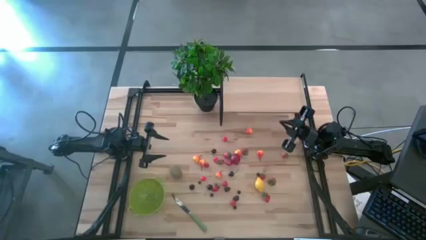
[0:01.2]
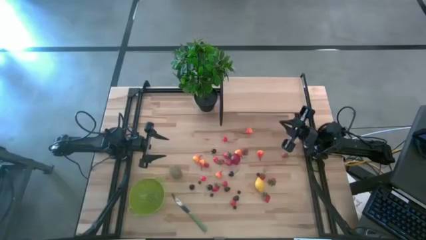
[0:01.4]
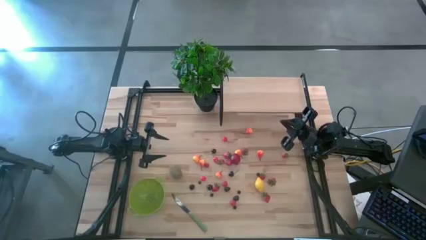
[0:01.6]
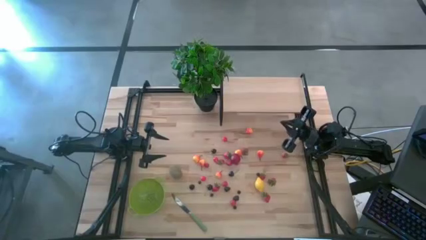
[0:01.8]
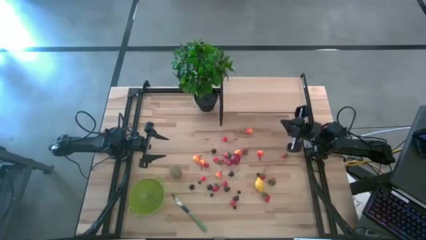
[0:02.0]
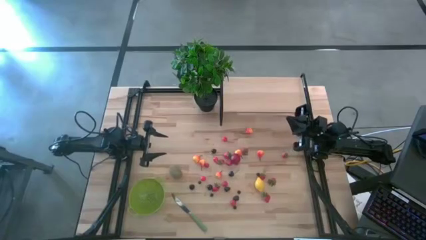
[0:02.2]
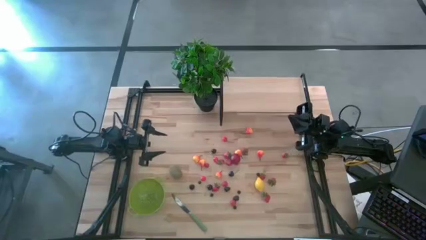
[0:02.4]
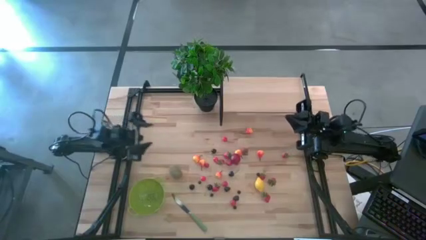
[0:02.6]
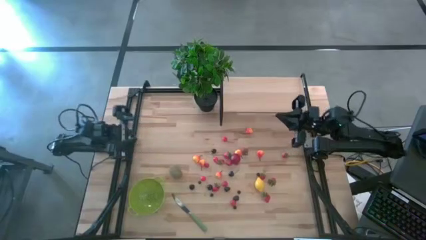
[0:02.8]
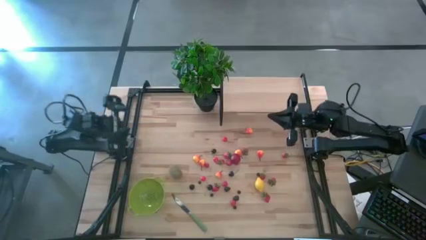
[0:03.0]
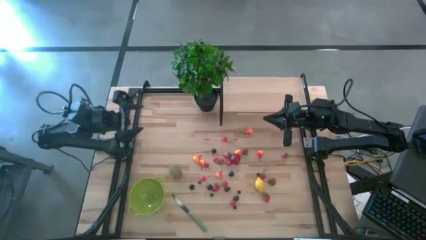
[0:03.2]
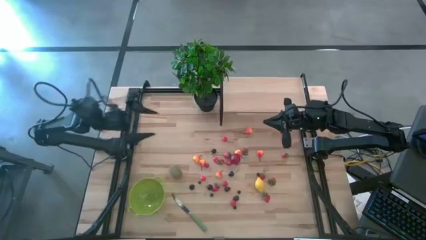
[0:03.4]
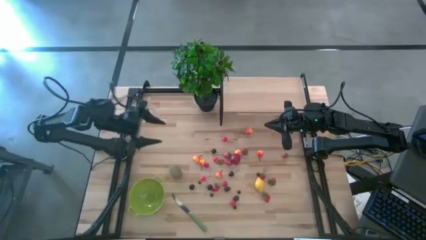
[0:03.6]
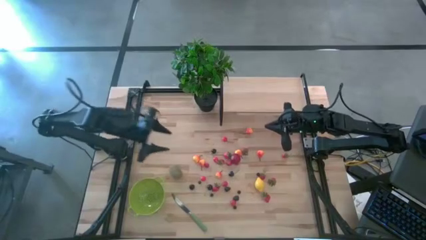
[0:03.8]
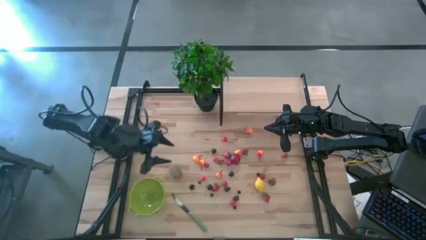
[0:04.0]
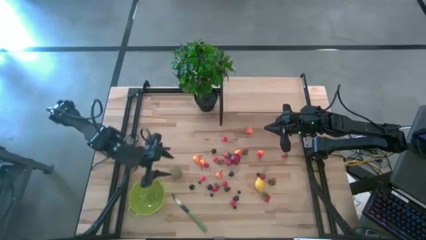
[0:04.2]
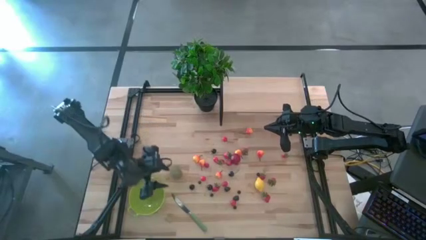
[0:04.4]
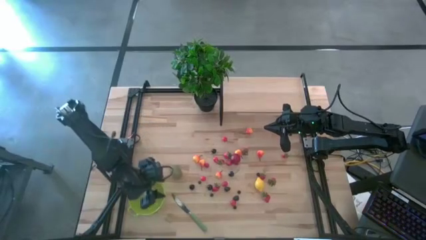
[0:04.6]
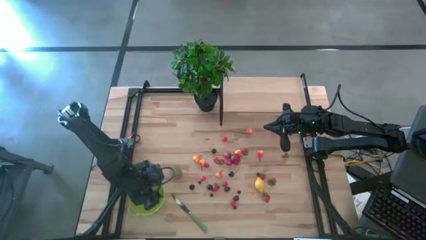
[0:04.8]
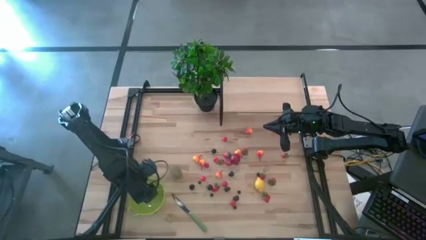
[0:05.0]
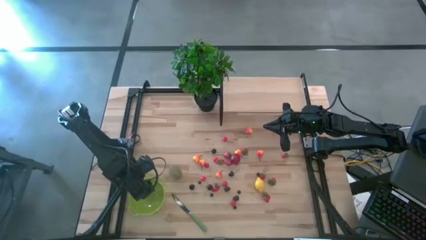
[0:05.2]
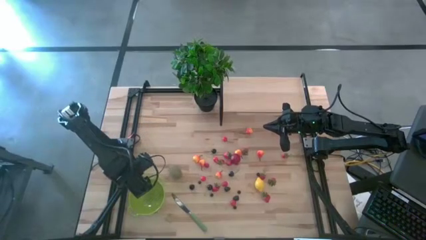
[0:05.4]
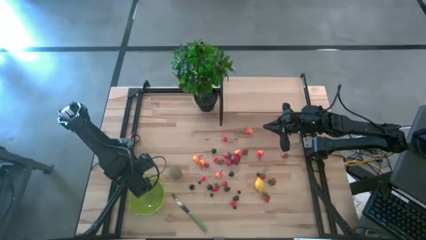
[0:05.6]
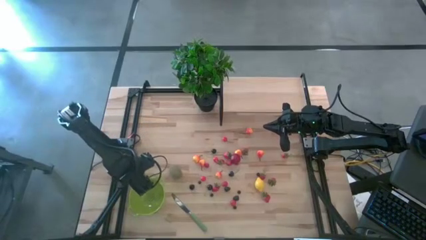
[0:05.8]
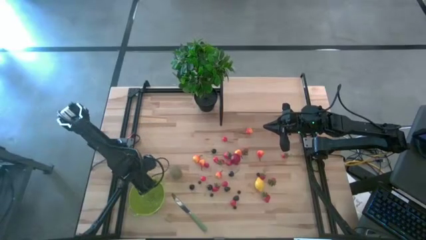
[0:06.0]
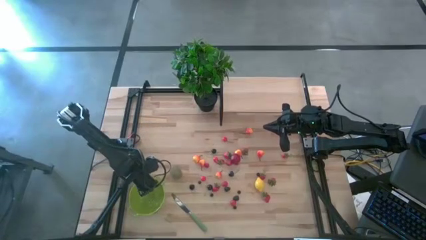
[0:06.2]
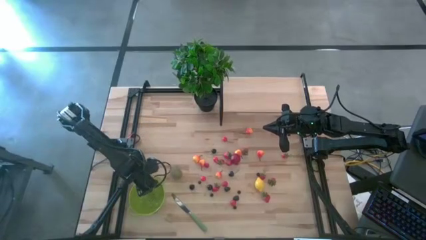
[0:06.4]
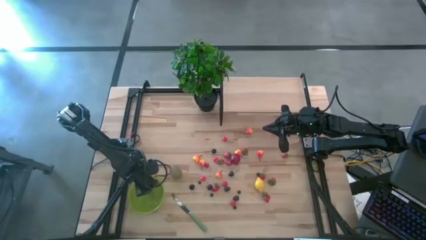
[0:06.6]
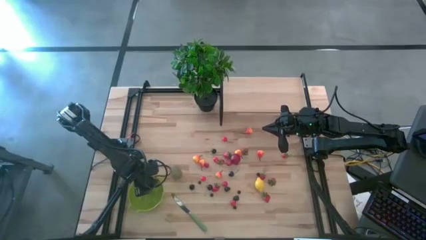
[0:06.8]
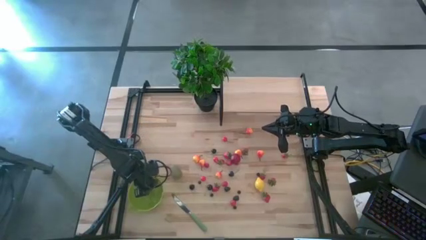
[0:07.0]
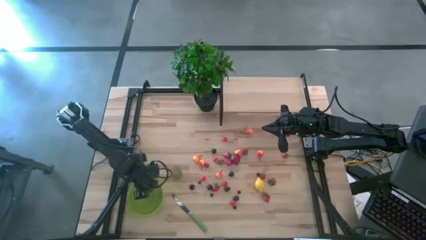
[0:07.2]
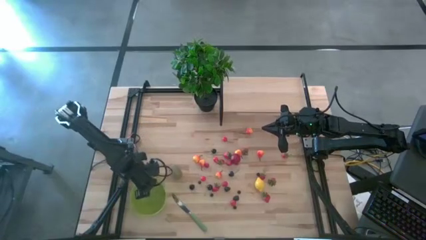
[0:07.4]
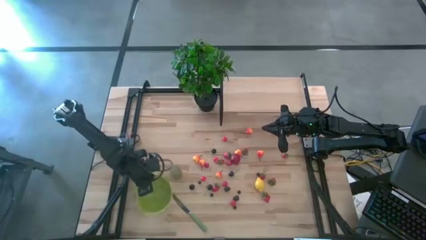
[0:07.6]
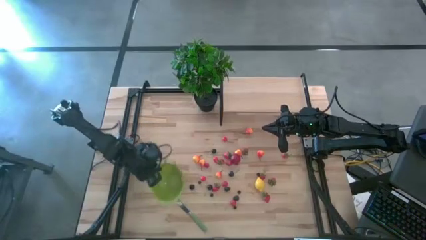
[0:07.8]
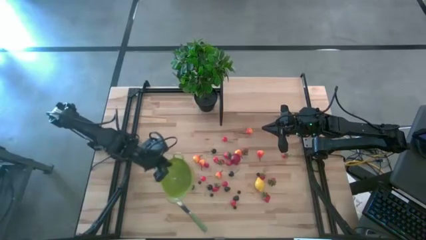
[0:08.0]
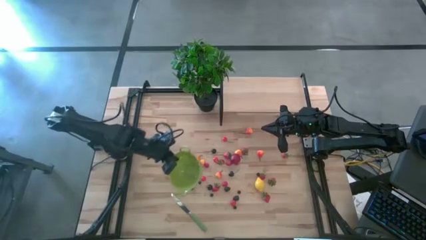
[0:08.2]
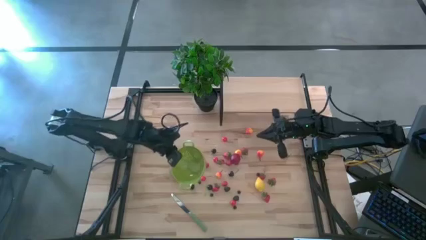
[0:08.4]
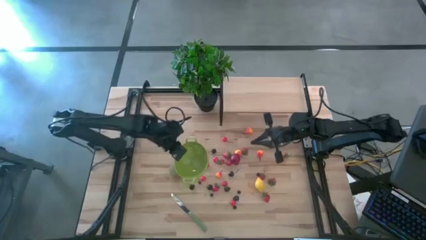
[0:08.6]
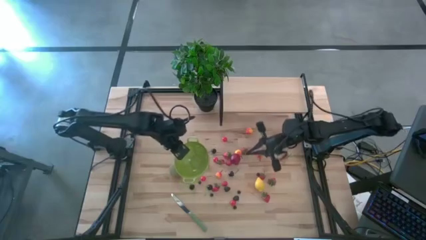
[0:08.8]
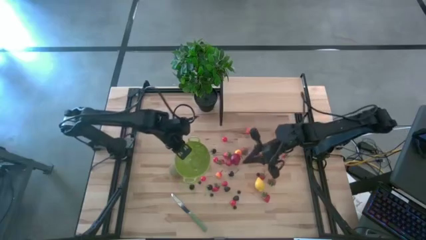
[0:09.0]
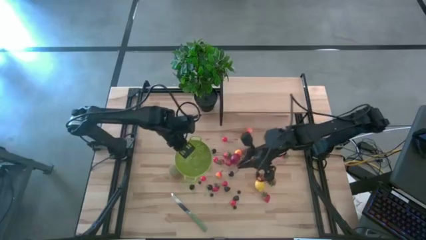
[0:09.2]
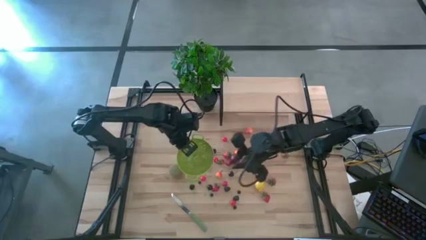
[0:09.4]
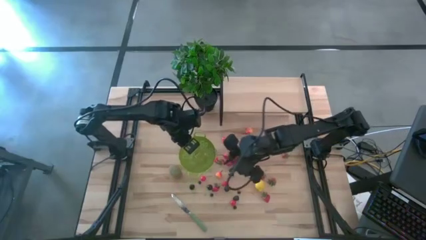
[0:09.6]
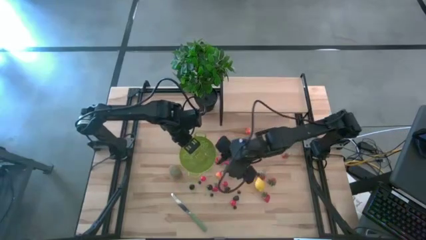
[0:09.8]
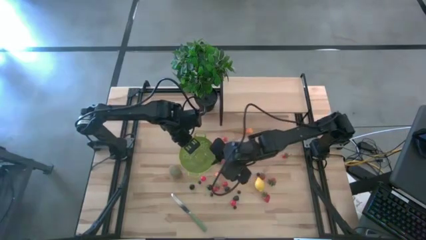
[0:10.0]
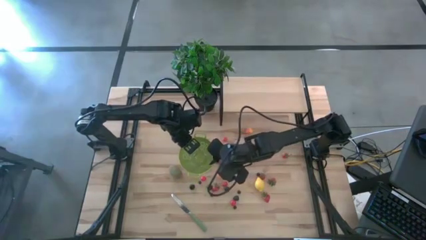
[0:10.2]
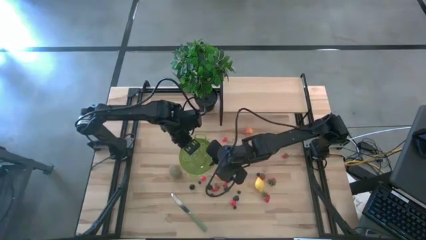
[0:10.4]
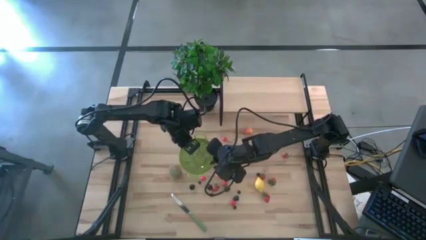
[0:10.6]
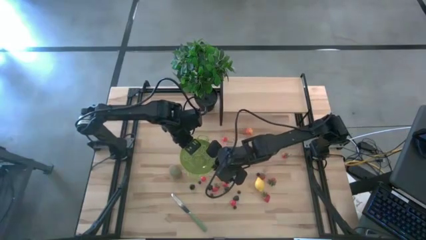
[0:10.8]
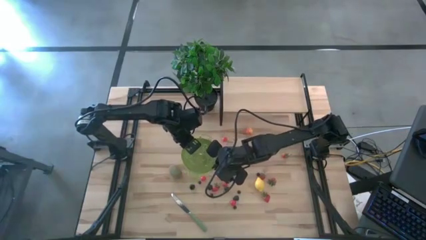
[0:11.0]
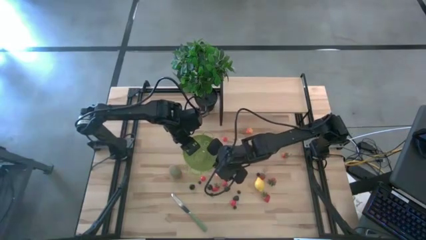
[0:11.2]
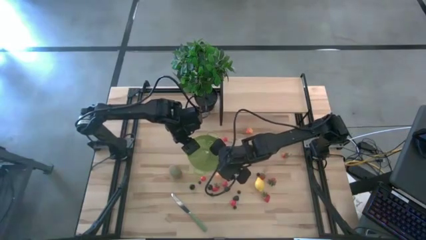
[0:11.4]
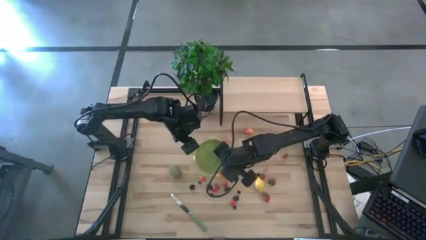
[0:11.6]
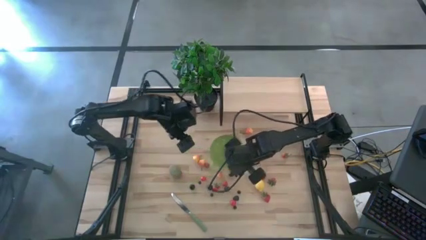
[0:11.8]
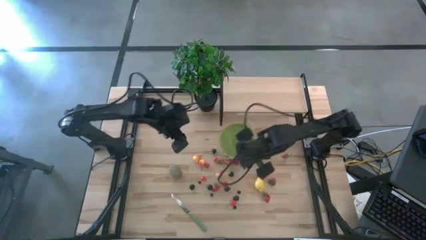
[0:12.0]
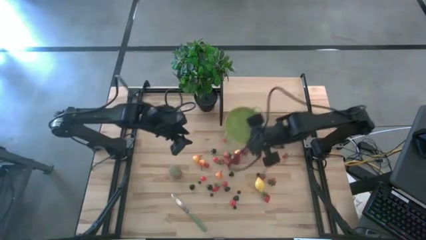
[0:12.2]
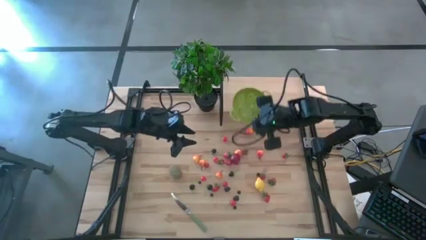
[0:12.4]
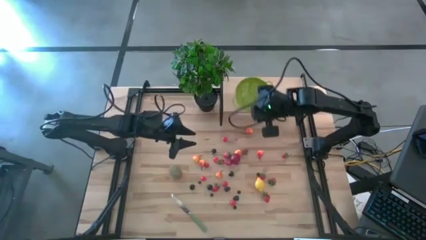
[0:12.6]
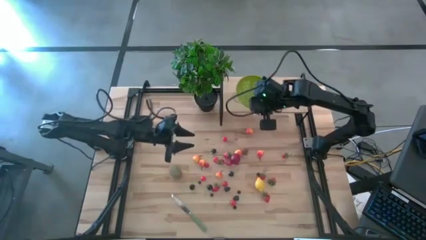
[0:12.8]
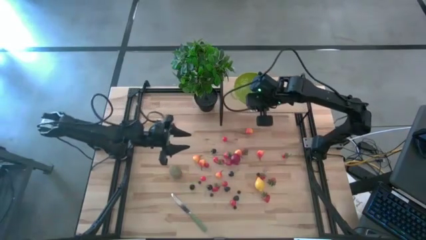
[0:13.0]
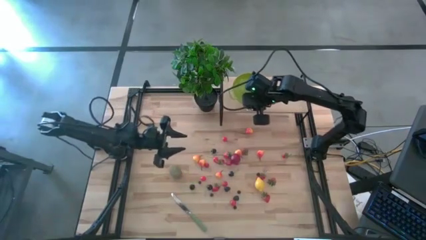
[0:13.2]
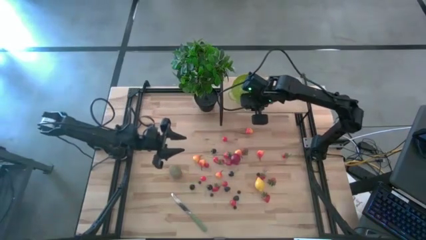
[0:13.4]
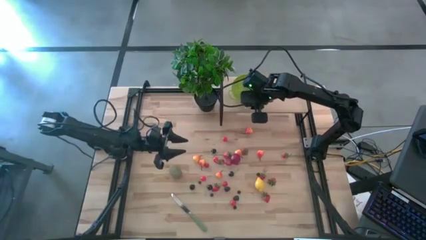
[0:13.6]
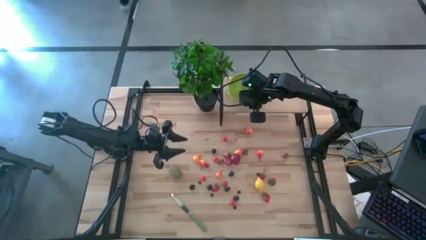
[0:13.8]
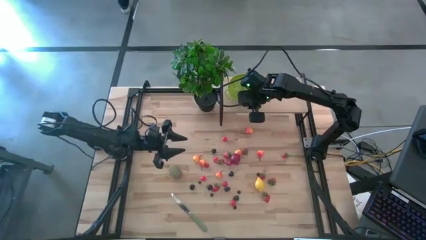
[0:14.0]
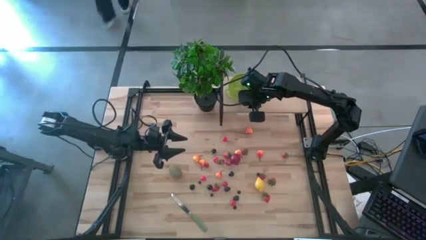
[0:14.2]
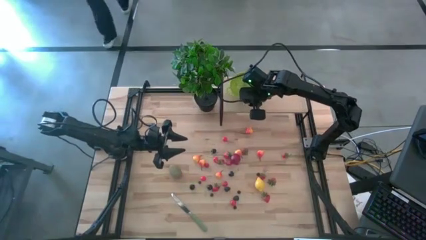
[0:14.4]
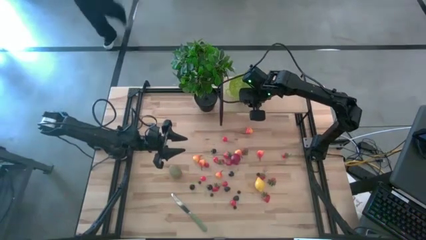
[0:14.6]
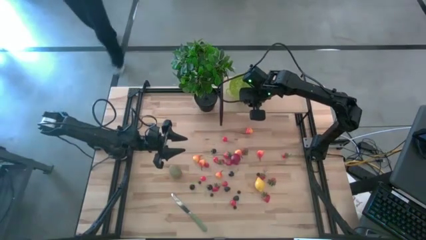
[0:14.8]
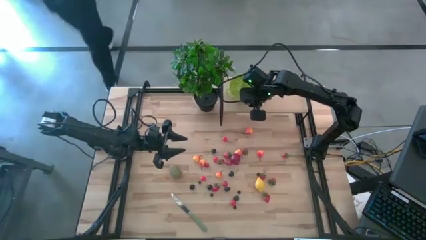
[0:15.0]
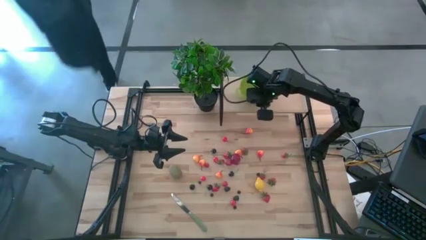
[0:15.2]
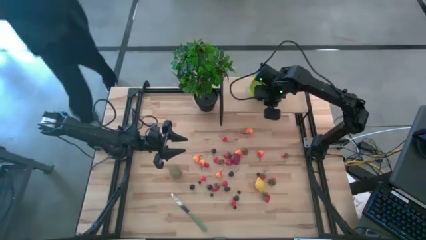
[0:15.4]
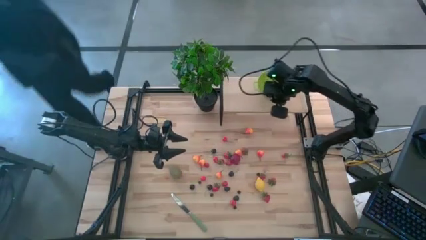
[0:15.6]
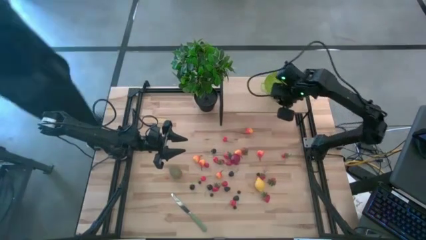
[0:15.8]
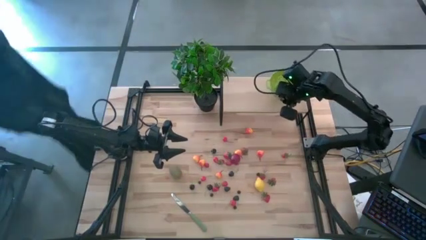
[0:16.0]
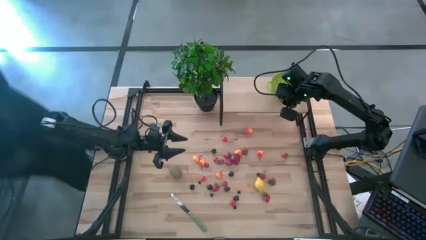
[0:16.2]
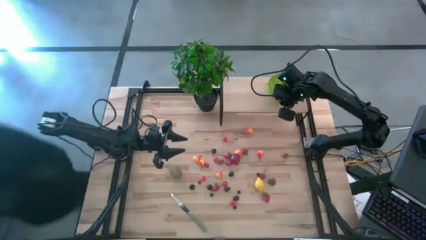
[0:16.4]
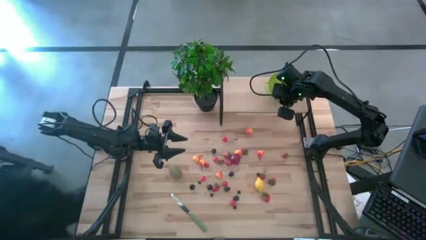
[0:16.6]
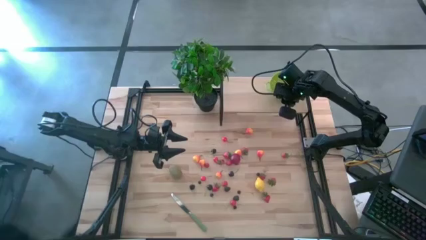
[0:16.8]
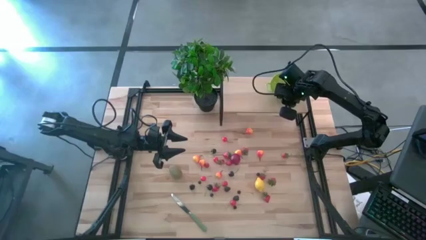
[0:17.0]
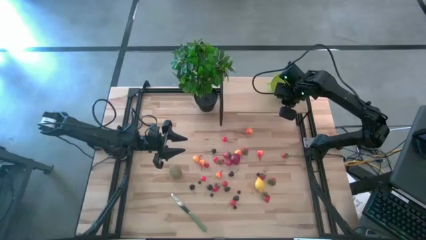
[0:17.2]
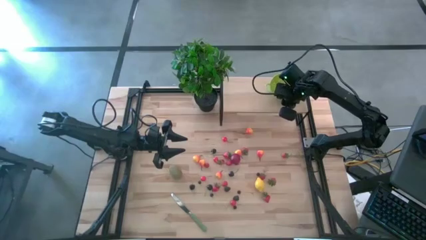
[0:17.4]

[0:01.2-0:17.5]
Task: Pick & Place Fruit
Put the green strainer bowl on the shelf
